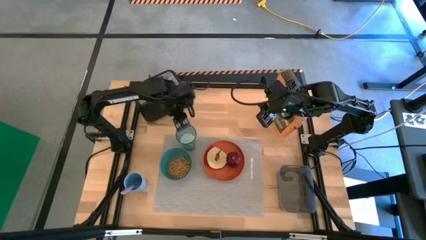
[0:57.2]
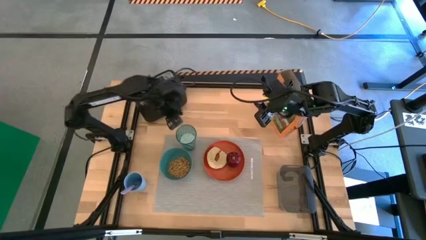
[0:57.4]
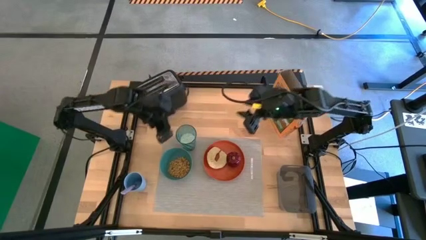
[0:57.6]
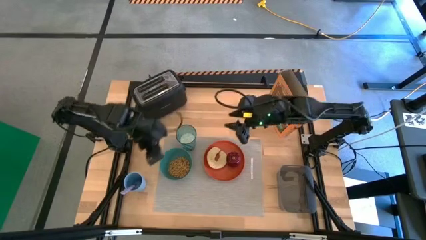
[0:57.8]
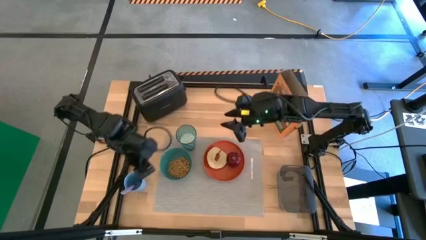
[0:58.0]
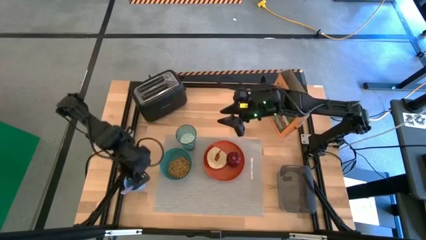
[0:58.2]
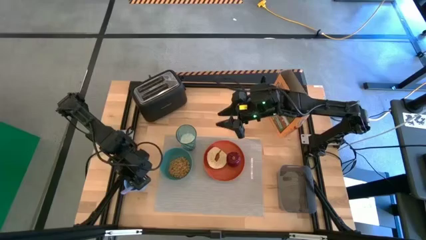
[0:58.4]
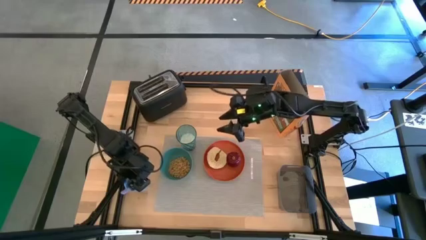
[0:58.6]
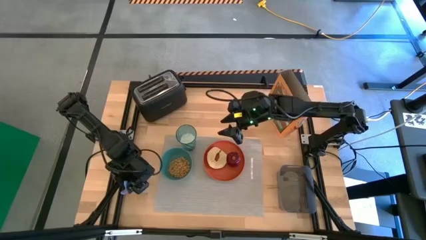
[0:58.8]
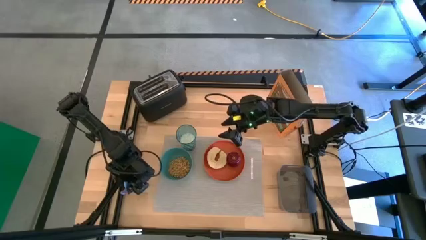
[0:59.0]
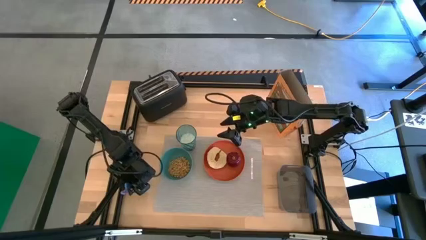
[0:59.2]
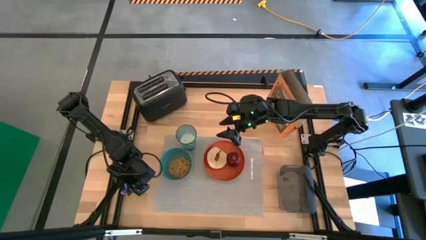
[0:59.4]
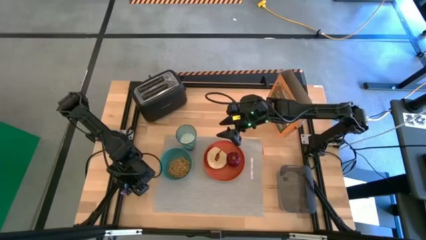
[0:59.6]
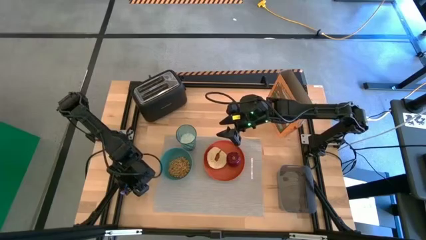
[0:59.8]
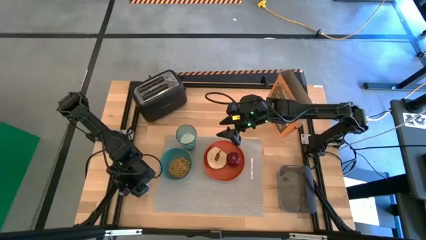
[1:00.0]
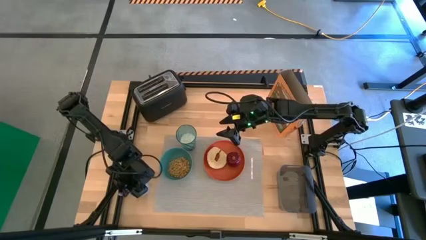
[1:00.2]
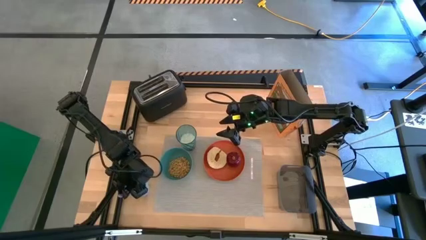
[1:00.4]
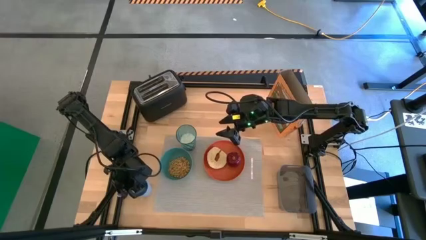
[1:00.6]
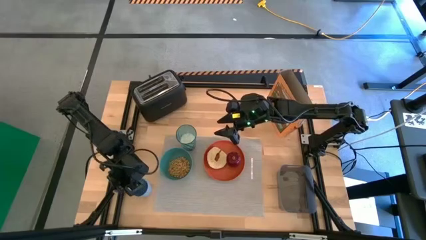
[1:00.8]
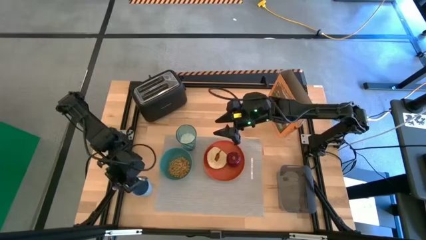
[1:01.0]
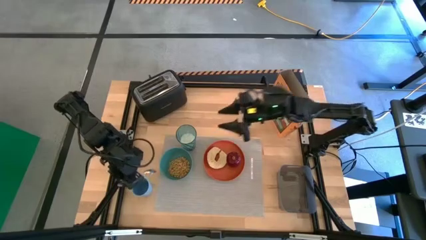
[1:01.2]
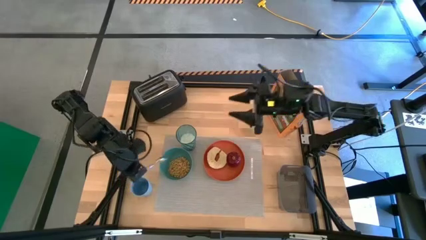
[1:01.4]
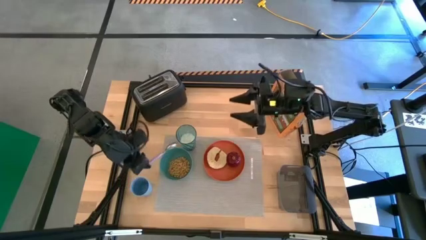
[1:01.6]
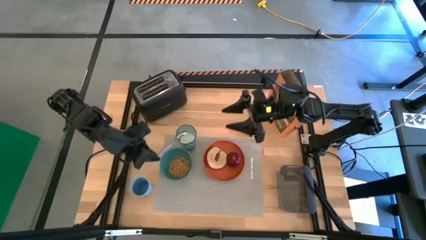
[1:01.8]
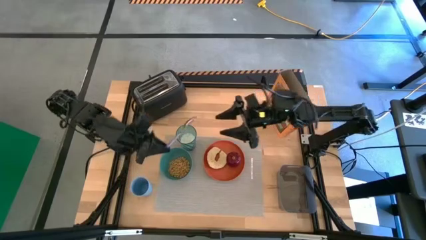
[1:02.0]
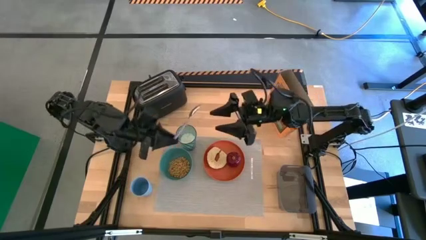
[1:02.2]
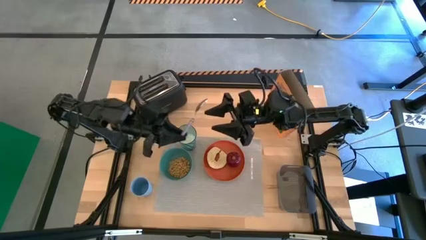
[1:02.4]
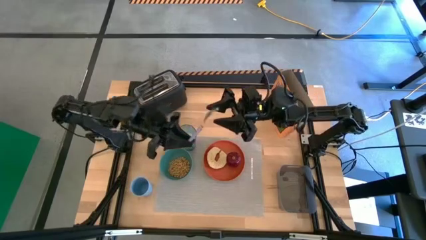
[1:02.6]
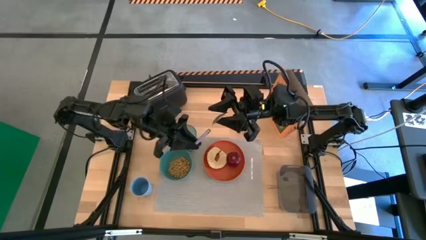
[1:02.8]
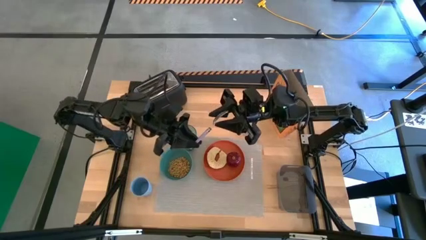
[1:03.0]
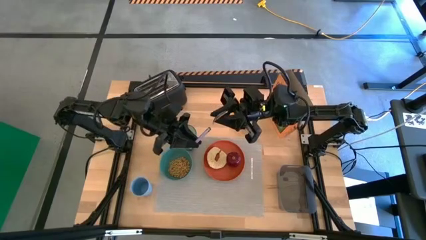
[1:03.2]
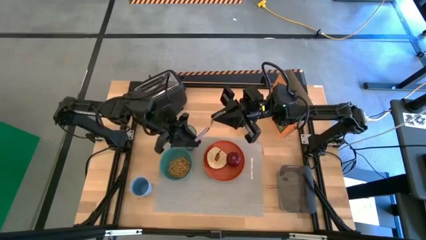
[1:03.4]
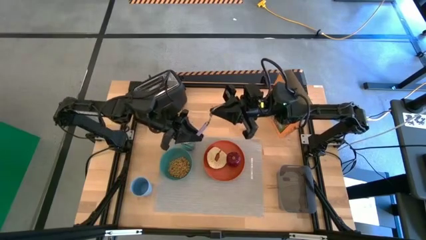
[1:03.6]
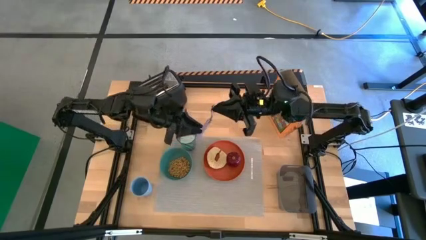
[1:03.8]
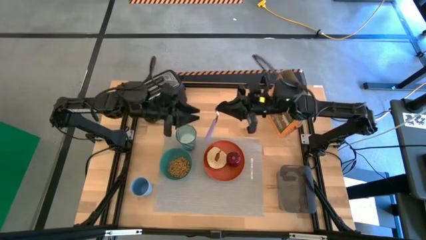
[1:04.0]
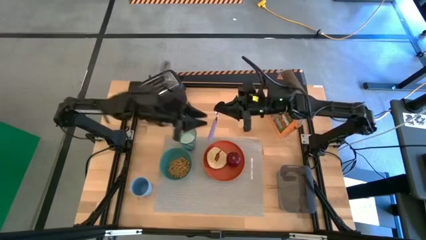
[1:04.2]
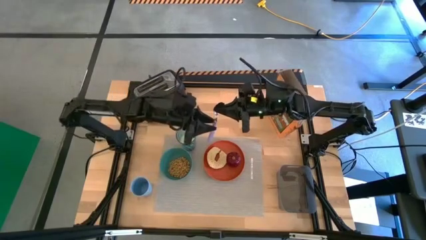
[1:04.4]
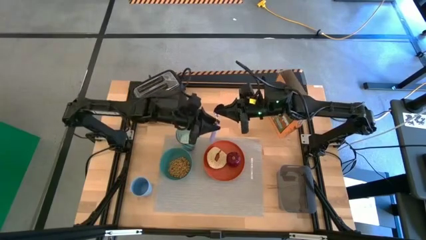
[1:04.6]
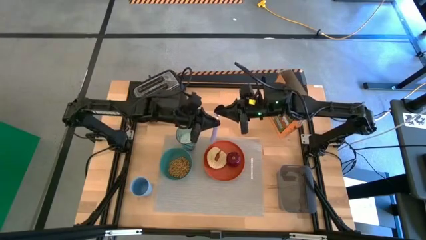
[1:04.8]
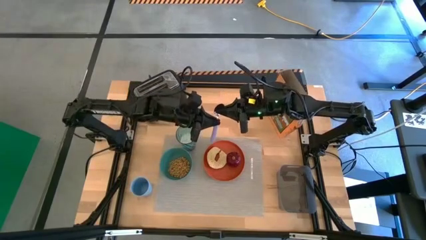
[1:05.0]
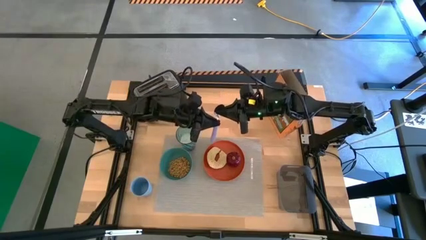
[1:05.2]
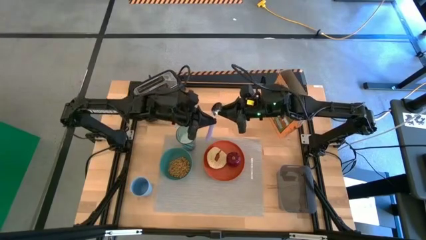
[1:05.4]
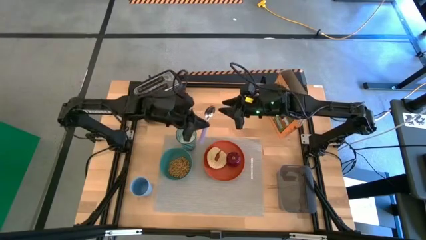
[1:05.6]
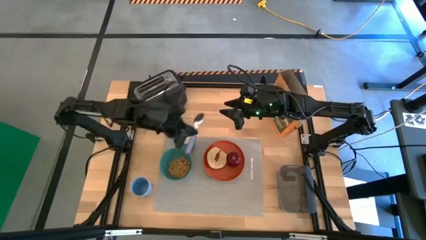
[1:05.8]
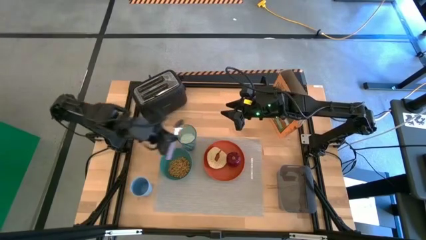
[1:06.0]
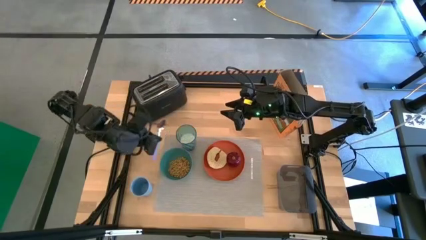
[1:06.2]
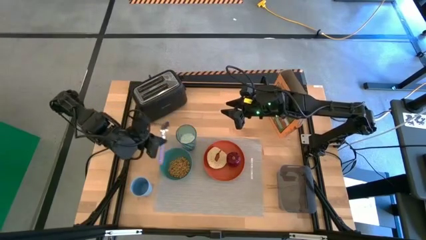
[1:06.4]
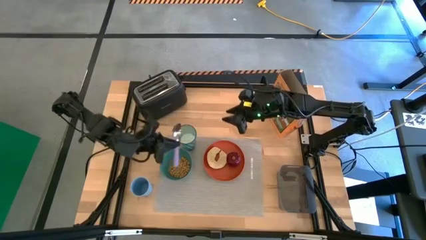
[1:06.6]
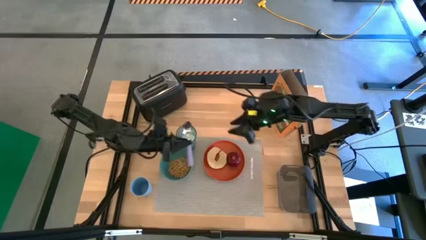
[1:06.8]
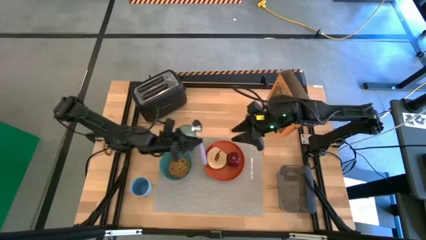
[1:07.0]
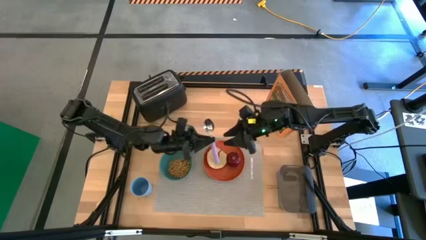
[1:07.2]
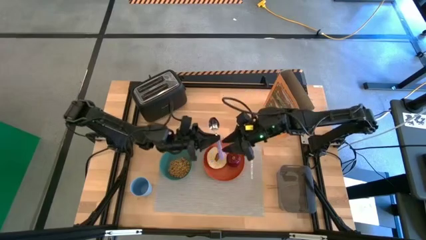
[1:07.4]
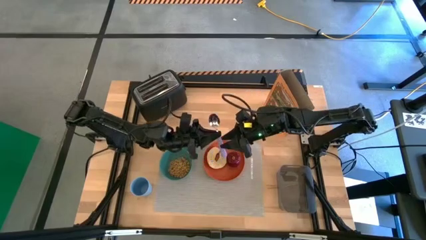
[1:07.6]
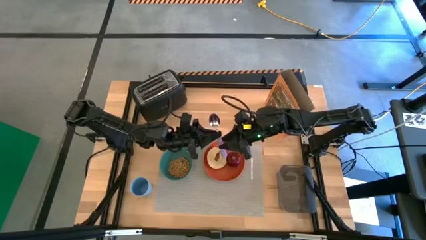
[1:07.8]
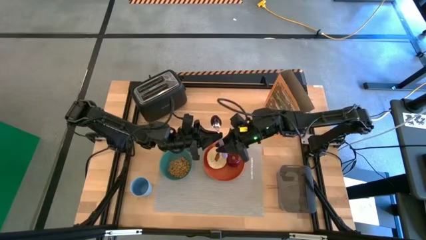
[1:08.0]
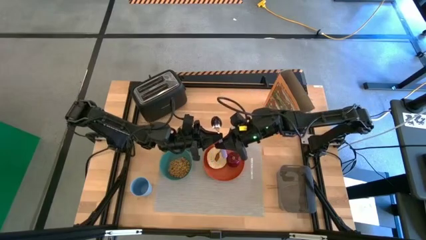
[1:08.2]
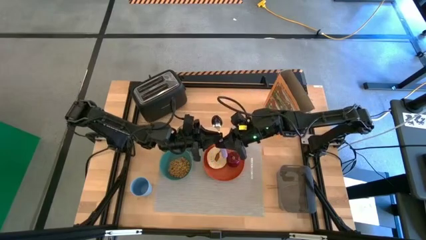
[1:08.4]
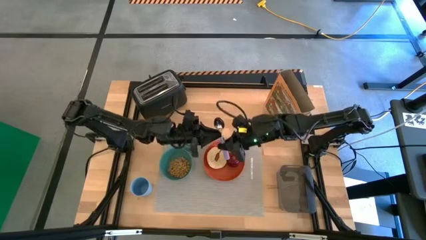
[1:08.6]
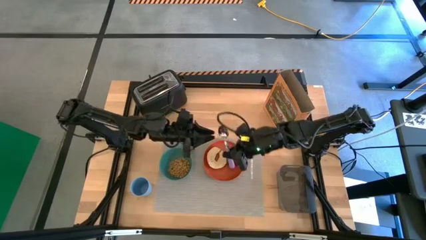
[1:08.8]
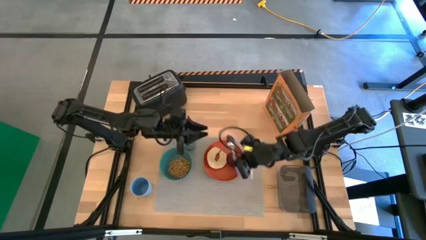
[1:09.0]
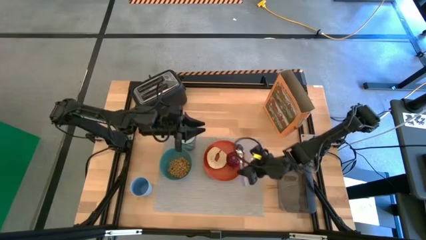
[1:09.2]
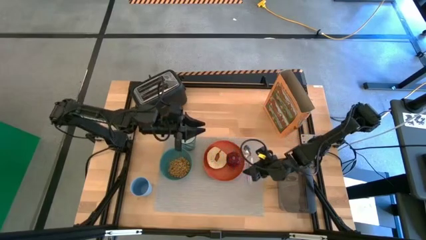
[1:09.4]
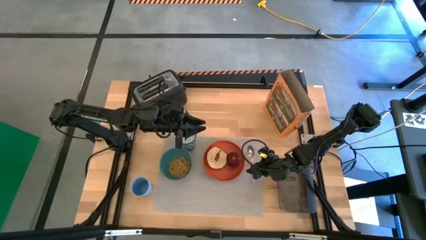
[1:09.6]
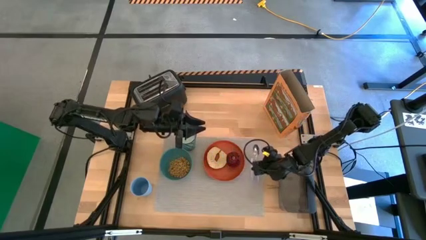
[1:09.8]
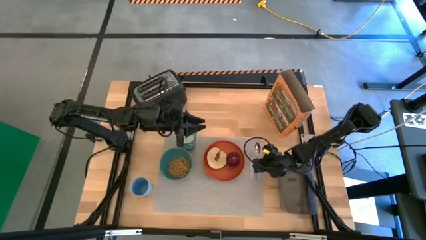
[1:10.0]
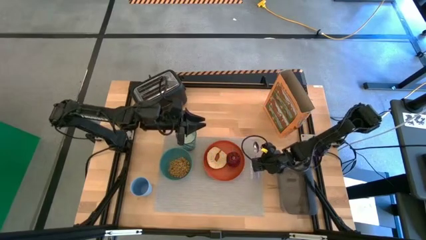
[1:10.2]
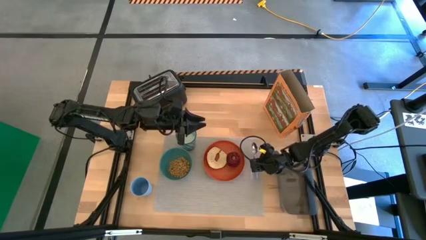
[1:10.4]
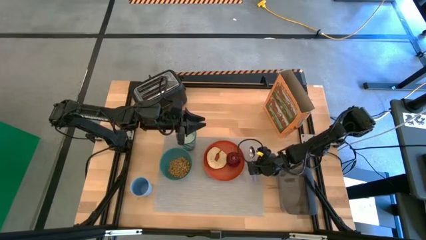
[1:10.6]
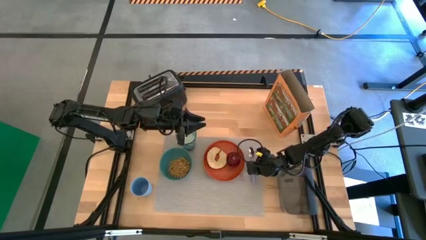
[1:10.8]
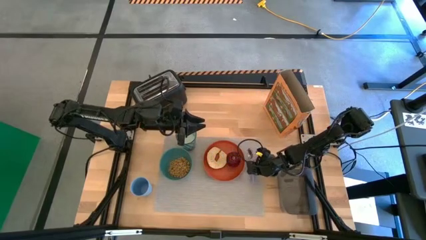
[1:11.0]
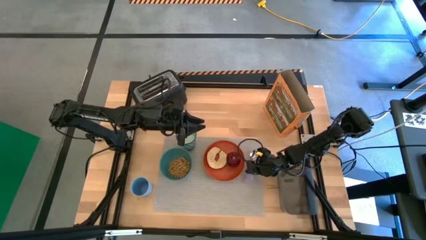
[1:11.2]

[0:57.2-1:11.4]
Task: Arrange a breakfast setting
Put the spoon into the right side of the tablemat

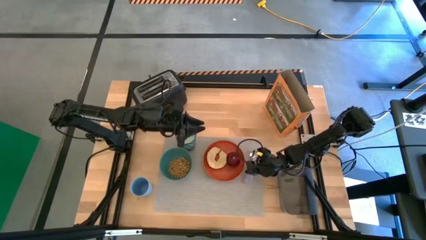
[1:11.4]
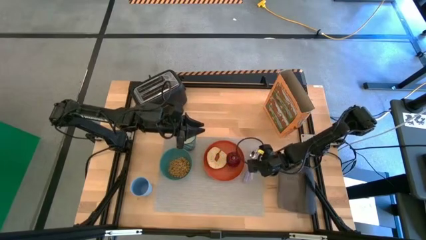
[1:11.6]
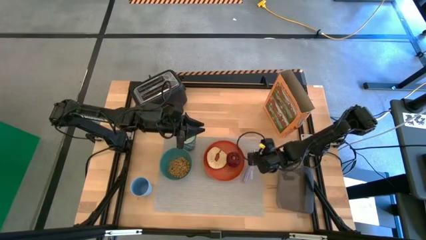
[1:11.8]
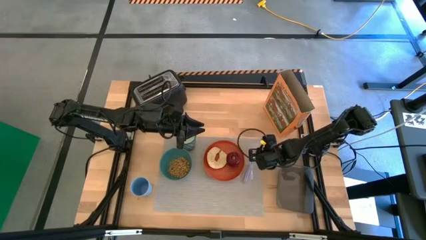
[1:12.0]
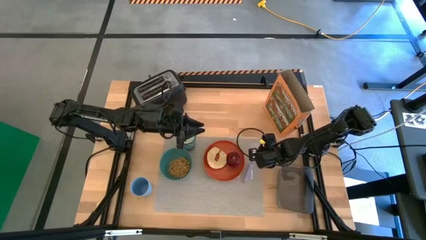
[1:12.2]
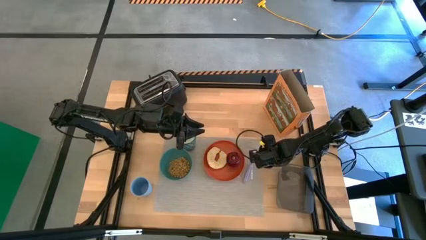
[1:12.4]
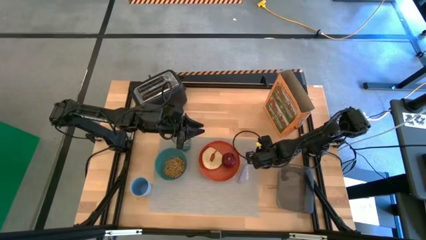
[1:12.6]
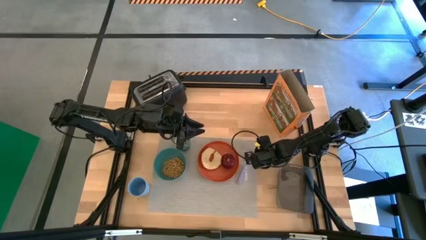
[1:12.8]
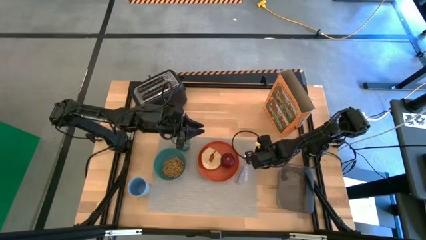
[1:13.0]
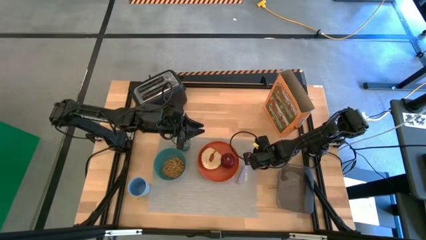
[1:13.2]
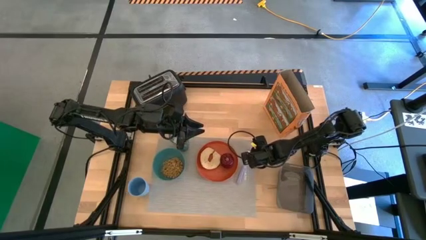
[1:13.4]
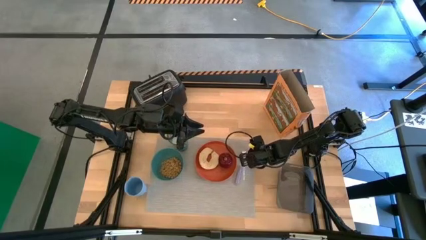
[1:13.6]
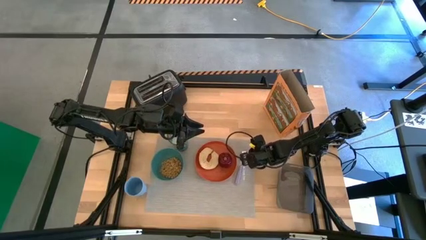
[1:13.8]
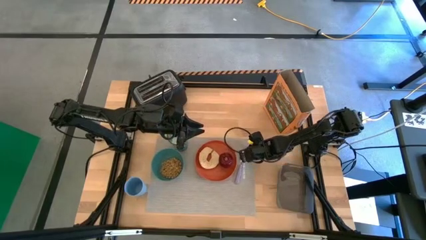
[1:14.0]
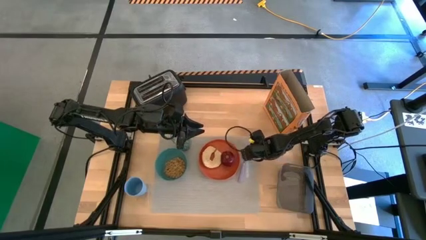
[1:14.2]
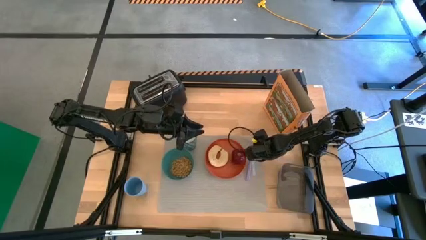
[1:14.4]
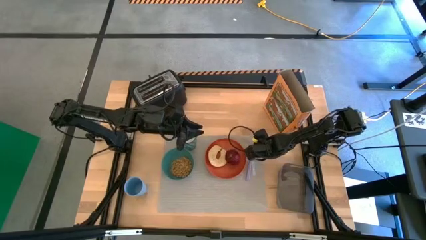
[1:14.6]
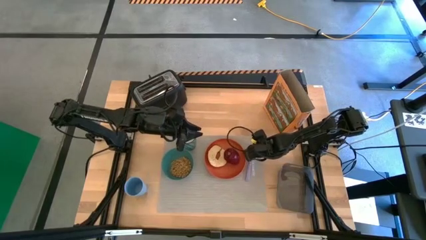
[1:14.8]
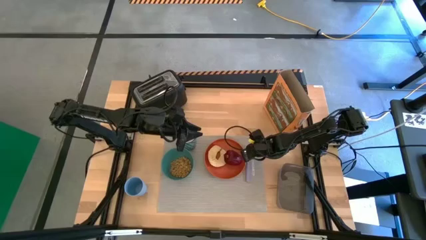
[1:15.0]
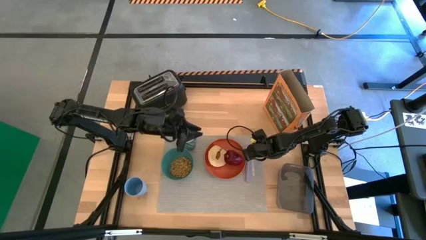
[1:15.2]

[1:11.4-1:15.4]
Adjust the tablemat
